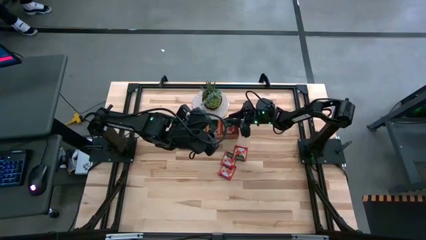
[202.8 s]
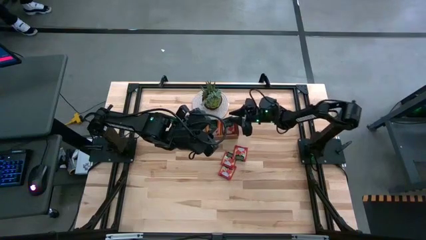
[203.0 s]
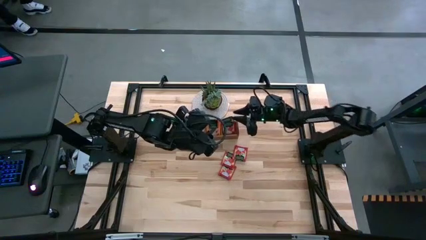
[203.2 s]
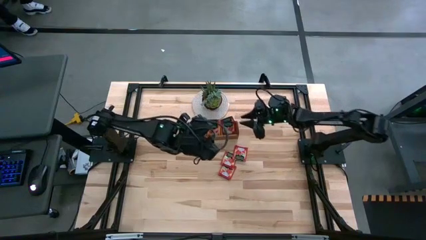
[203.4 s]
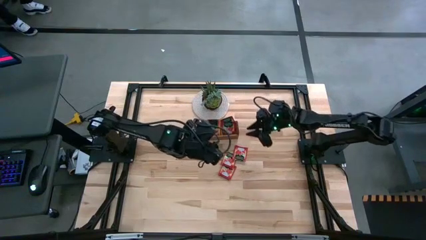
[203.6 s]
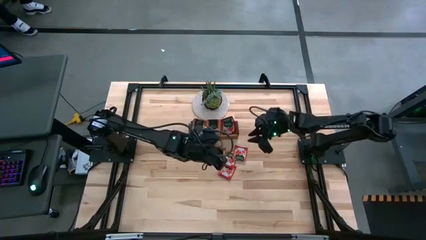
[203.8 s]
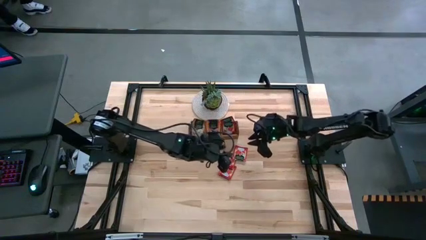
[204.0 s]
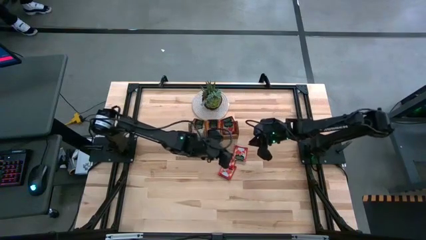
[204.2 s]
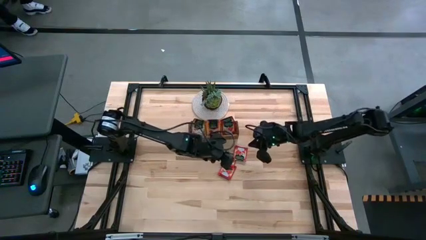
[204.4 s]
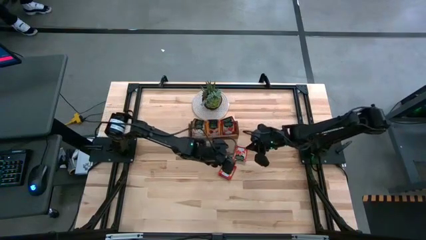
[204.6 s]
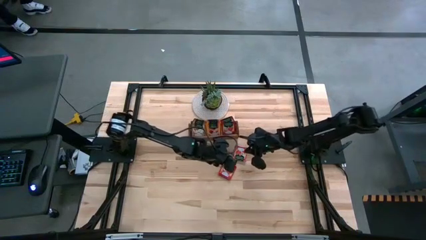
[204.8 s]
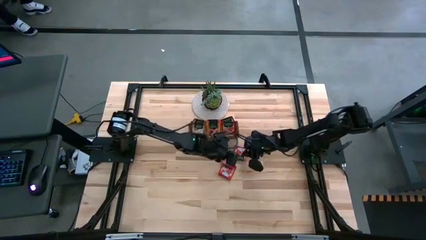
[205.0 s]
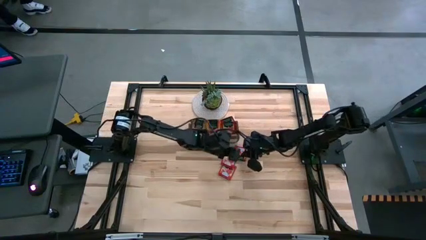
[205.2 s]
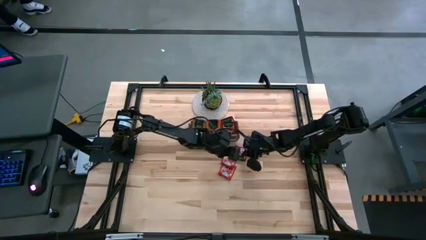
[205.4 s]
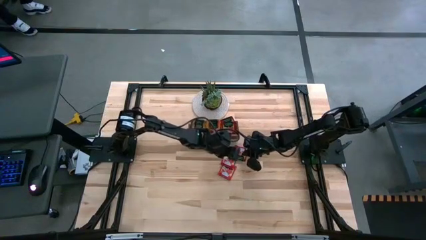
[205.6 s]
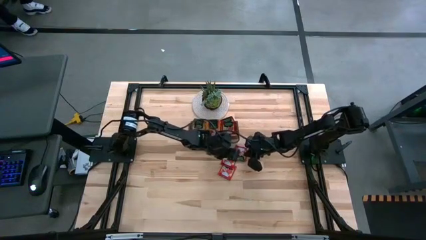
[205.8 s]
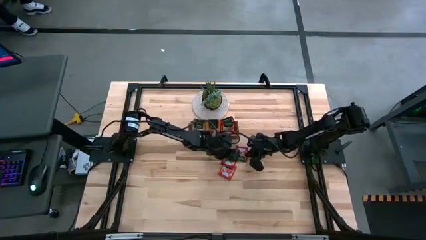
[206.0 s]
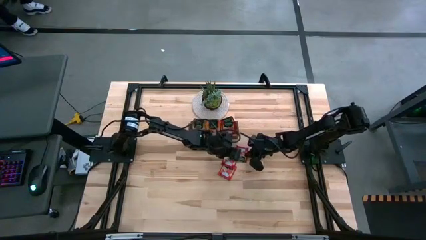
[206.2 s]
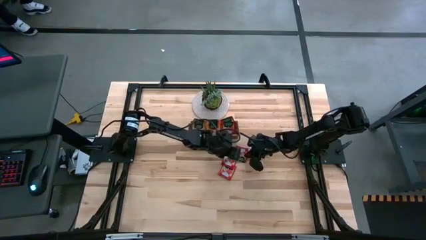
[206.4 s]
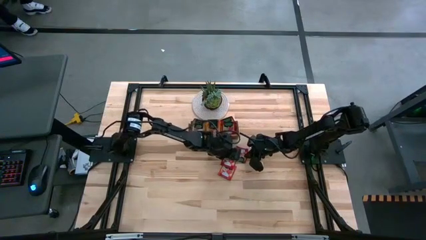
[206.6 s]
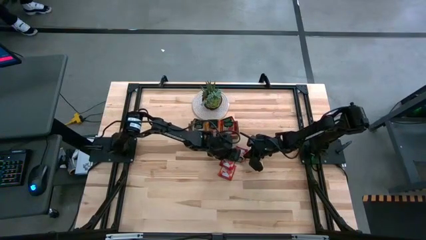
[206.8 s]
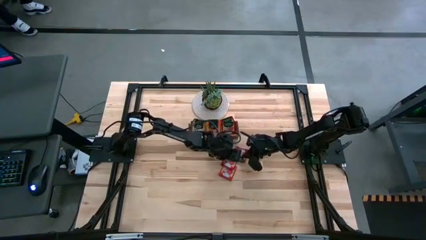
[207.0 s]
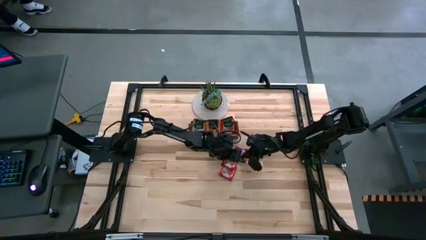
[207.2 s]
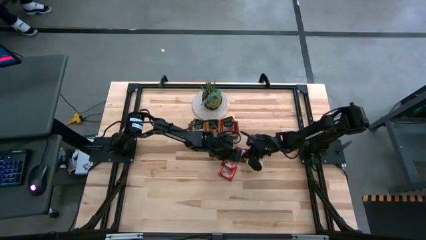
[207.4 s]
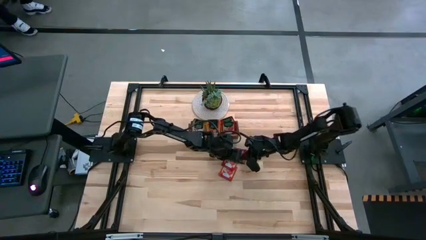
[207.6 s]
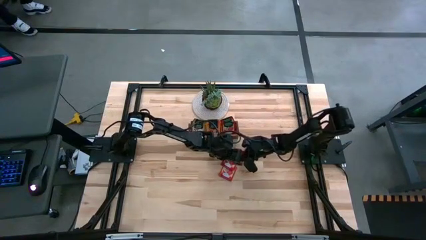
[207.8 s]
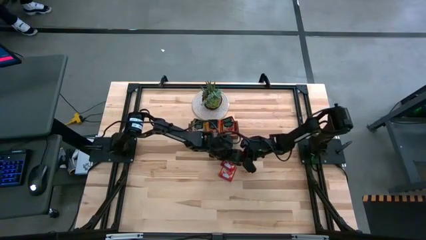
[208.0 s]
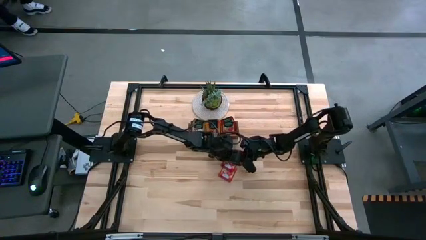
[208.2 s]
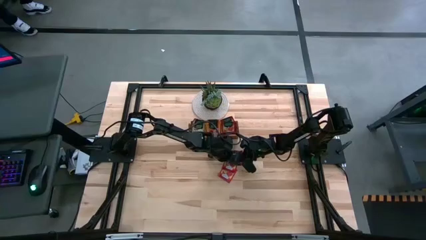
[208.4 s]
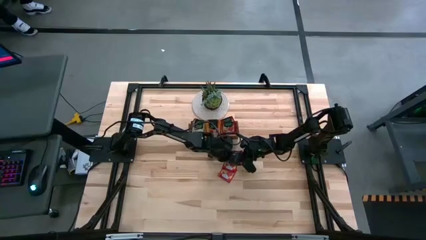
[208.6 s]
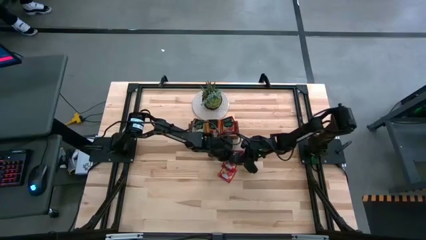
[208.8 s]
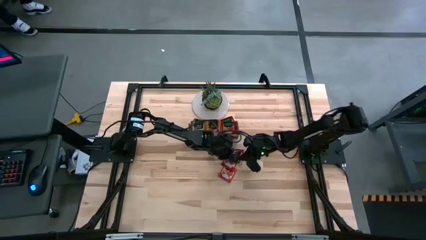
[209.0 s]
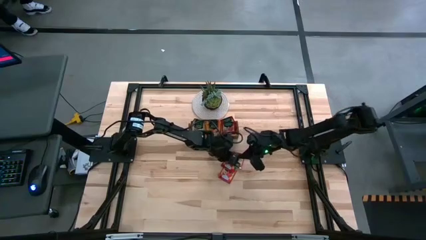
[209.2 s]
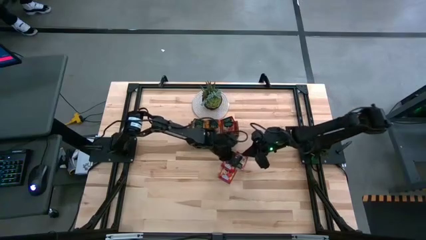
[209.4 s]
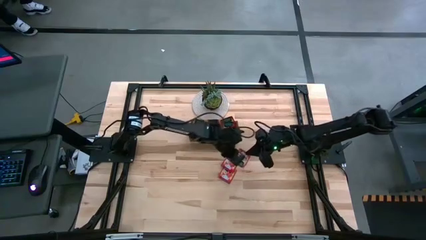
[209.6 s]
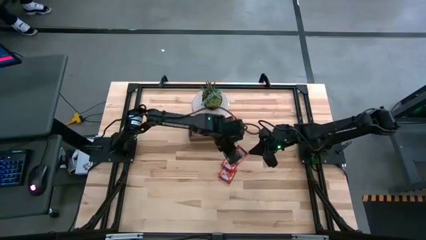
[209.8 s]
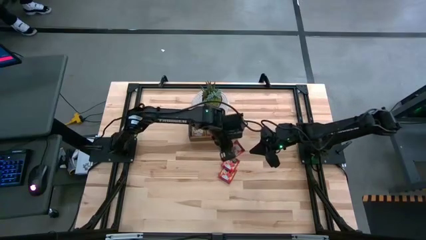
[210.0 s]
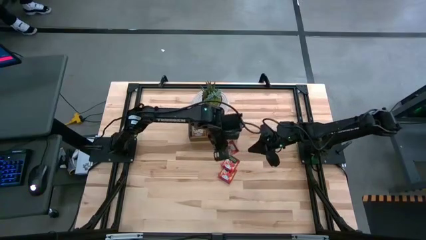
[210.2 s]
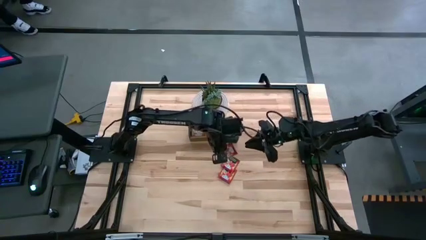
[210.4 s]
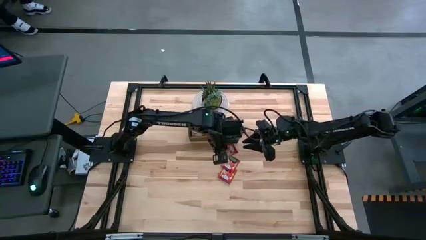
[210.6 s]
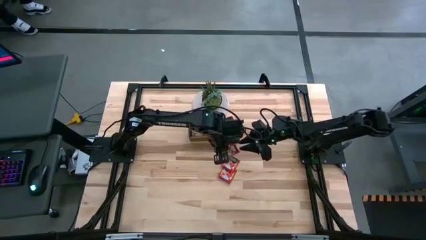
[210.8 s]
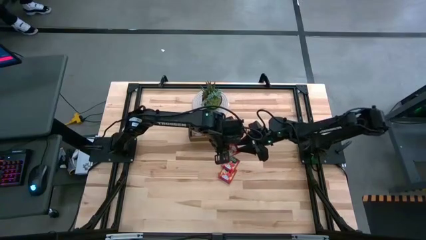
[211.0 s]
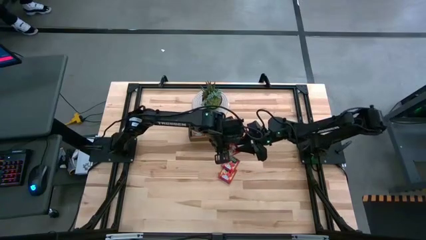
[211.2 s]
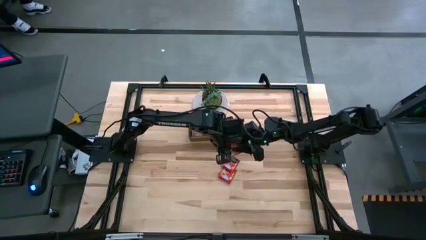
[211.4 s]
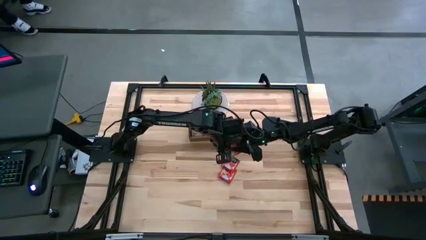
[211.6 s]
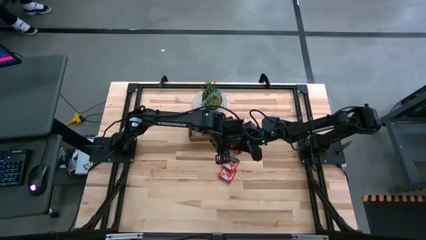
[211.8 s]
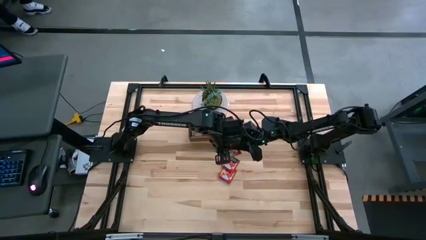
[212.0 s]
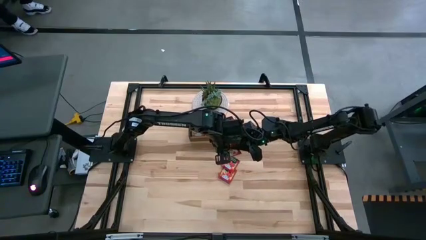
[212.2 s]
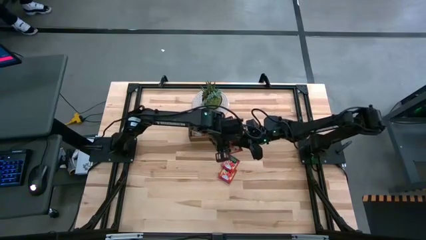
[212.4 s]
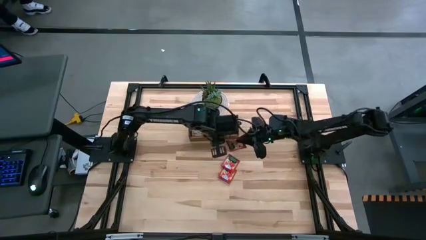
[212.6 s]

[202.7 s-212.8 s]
Task: Pick & Place Tea
Put the top red tea bag into the right section of the wooden organizer

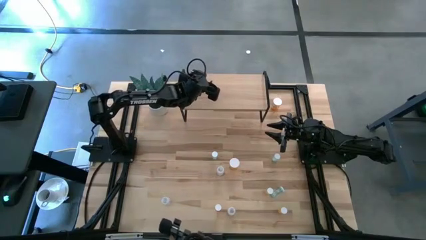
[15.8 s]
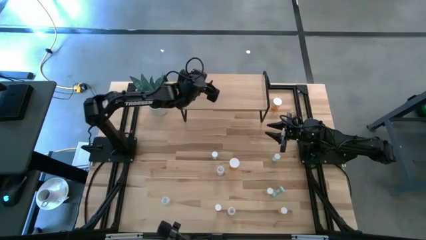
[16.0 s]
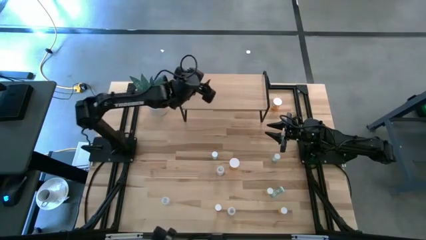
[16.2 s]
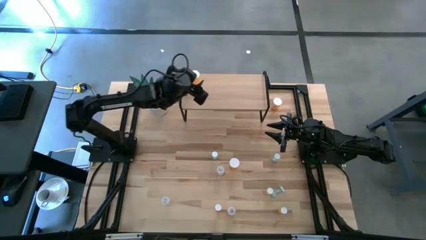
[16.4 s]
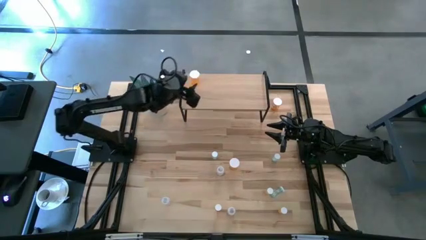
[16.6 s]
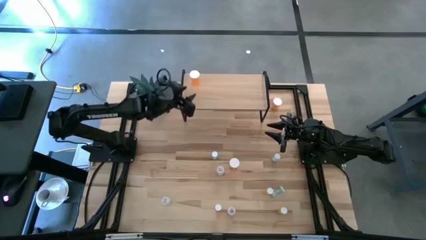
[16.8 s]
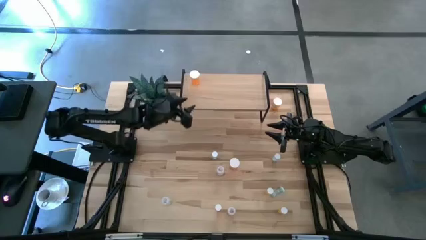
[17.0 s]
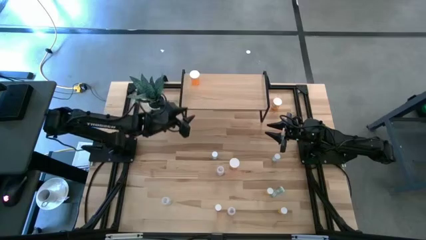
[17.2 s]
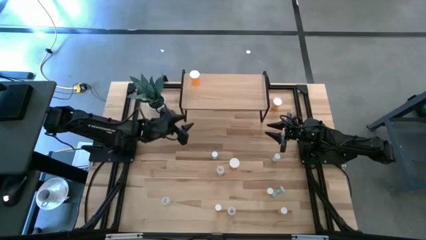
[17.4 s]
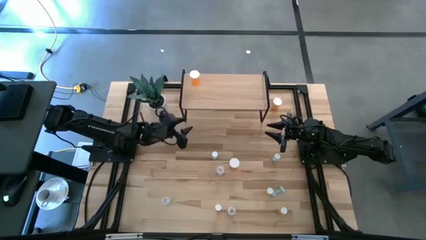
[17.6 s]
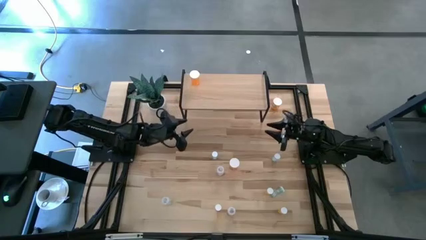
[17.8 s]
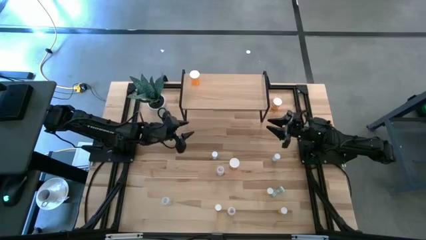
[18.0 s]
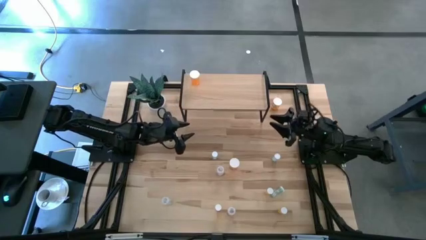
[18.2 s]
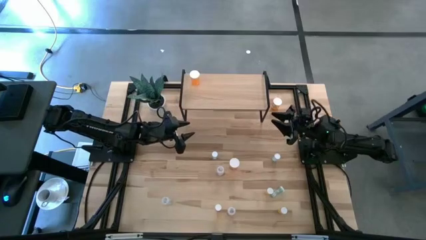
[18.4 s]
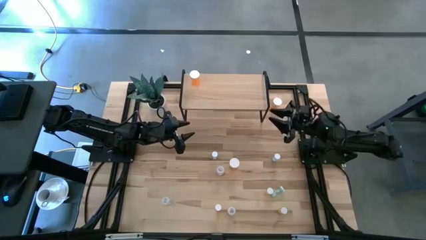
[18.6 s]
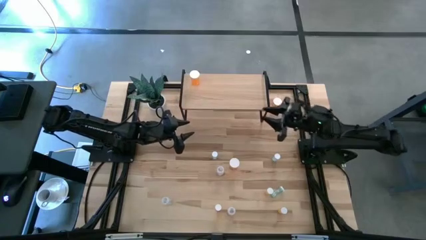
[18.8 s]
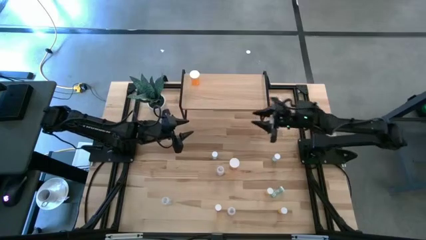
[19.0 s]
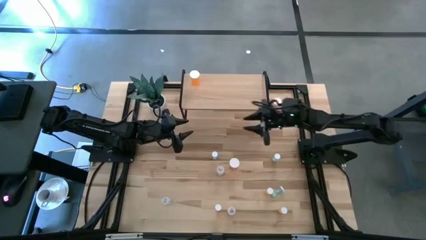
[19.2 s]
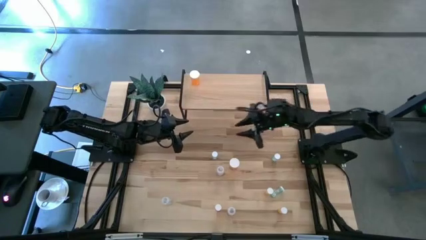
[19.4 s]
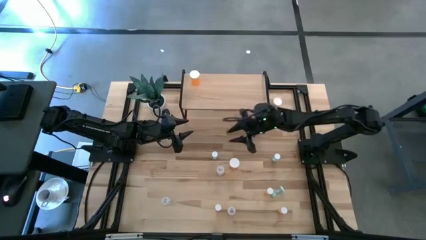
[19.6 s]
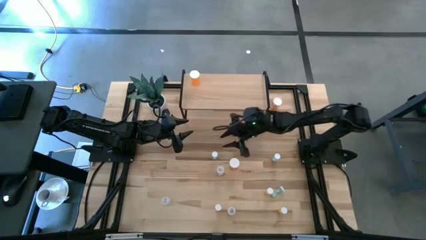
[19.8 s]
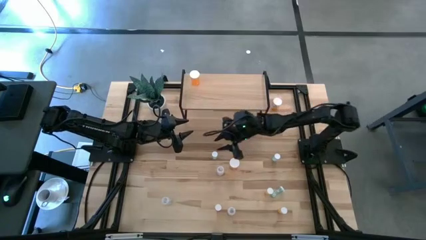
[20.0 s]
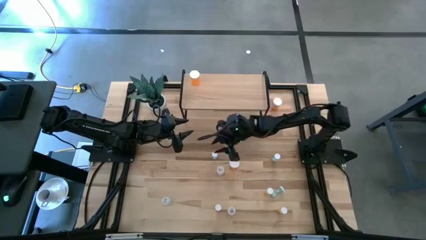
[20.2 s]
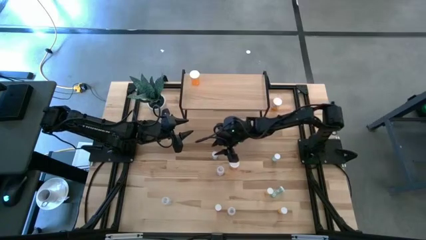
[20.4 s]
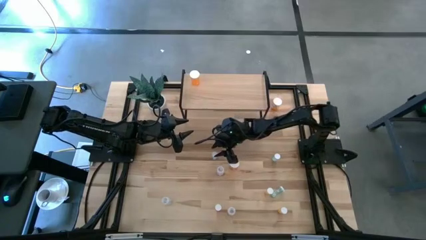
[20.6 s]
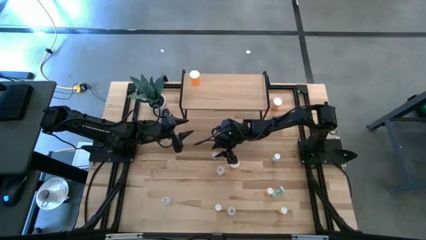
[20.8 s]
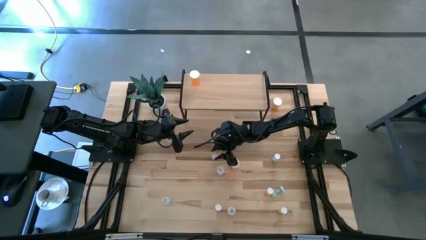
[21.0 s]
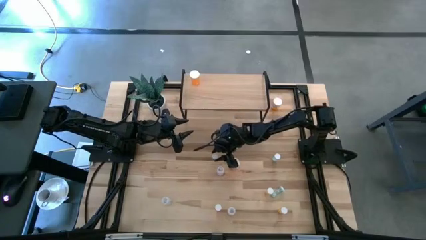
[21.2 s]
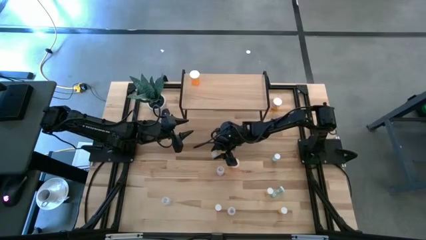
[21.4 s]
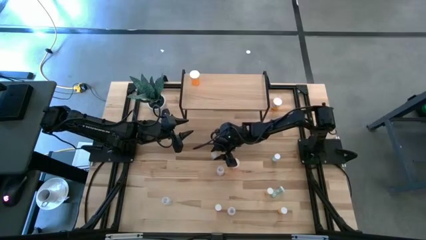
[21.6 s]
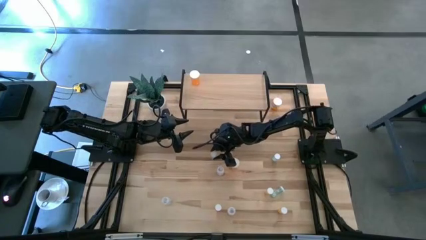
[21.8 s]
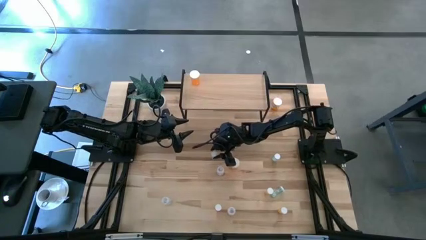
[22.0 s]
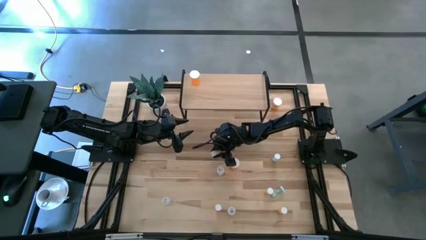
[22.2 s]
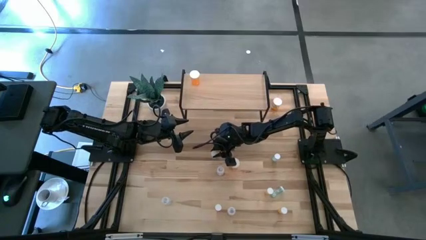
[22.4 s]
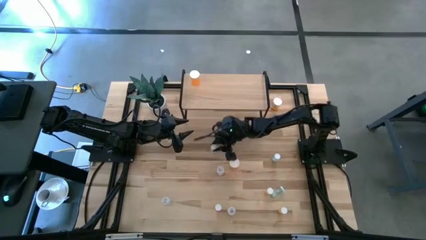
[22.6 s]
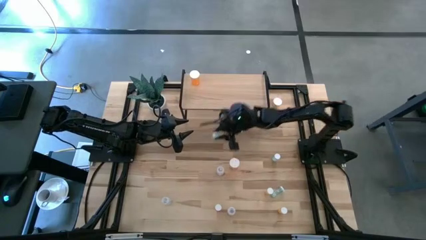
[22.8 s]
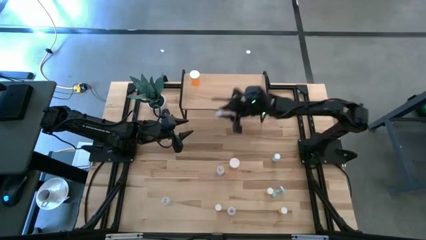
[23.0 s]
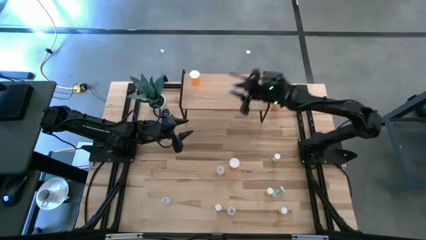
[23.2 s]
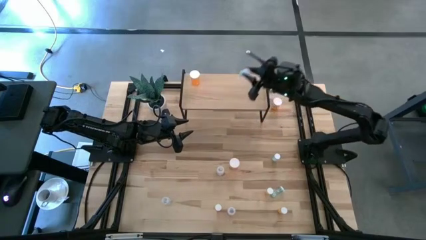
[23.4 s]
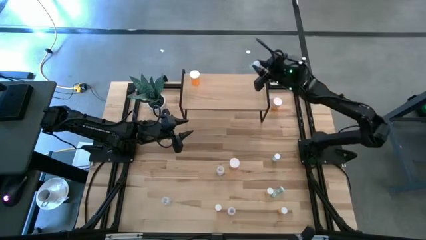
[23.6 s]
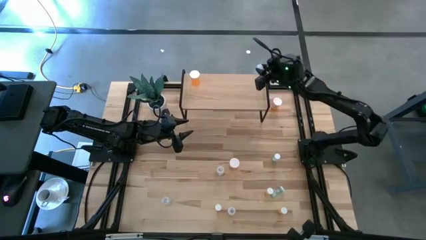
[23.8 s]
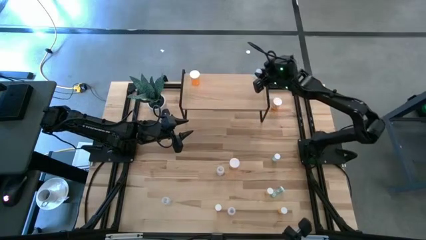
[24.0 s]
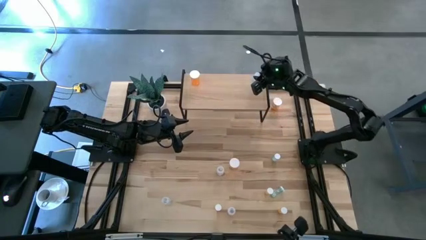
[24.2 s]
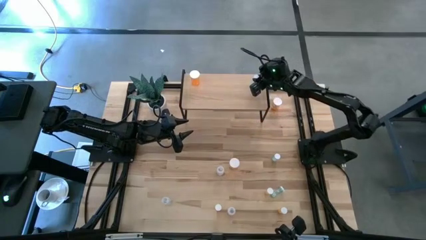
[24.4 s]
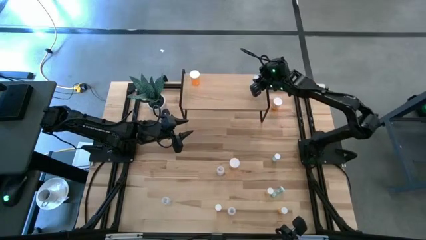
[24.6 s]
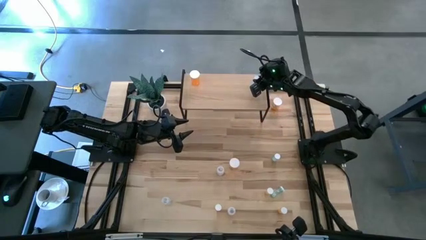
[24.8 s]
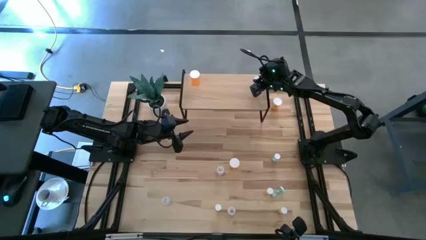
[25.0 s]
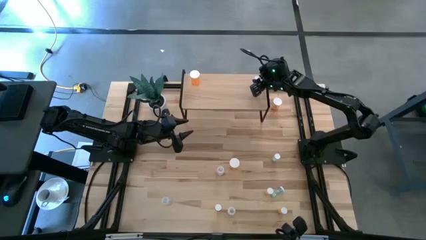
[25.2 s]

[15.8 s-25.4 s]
Task: Pick and place medicine bottles onto shelf by color
Put the top left green pill bottle on the shelf
